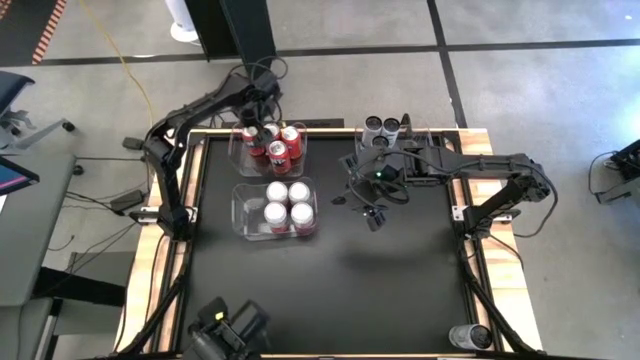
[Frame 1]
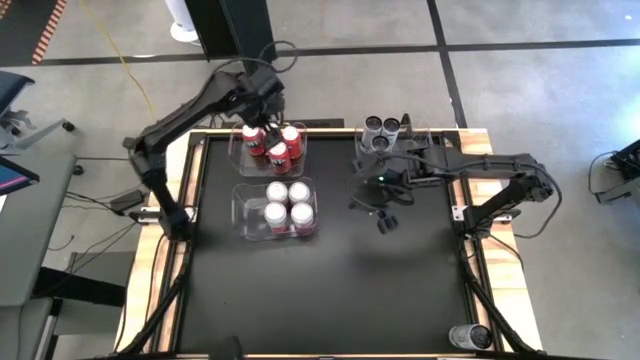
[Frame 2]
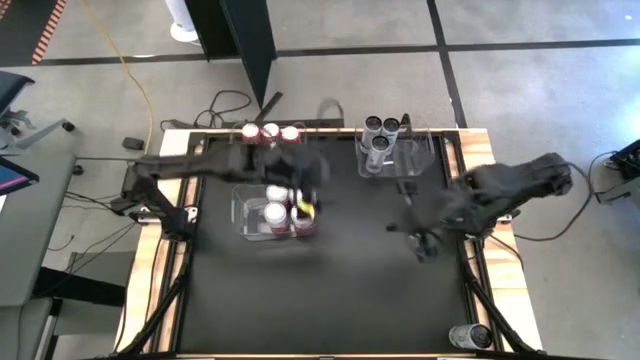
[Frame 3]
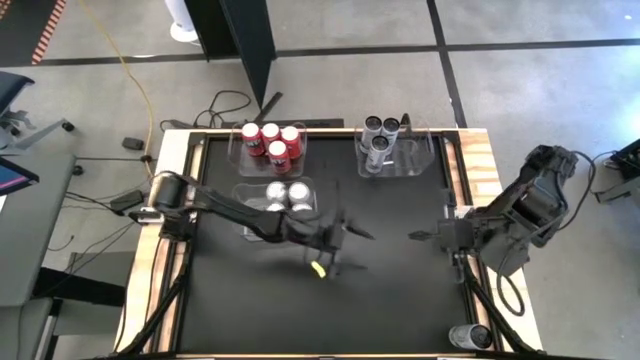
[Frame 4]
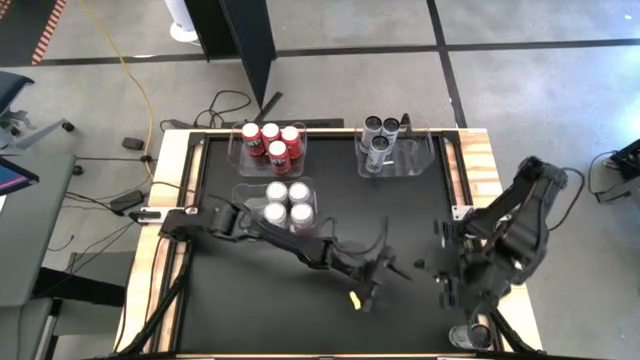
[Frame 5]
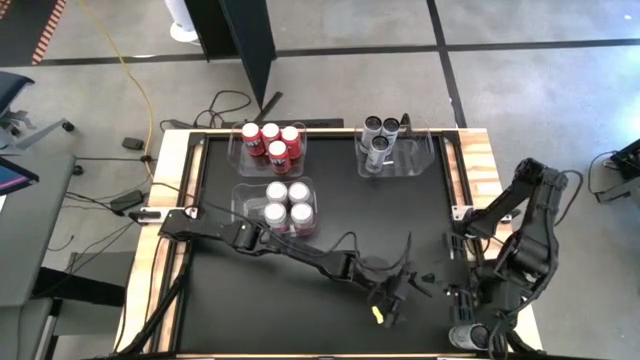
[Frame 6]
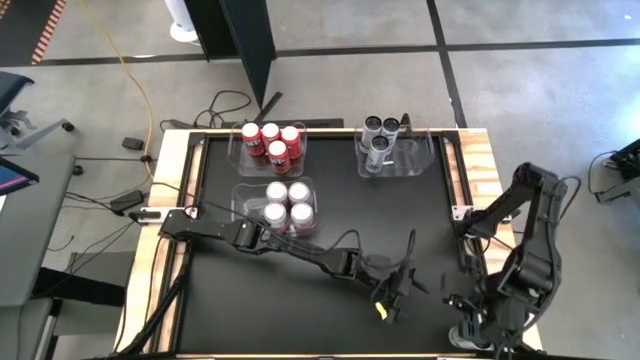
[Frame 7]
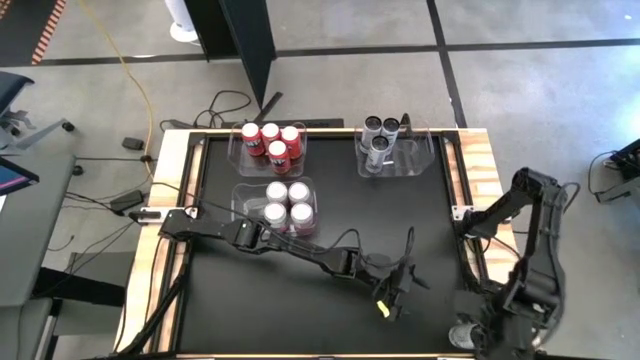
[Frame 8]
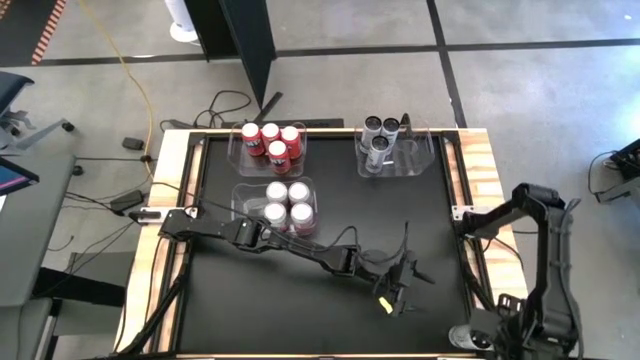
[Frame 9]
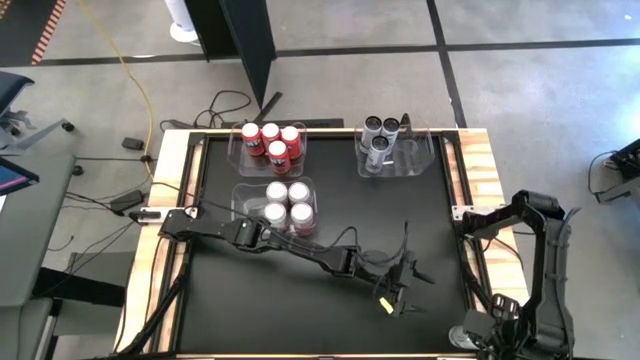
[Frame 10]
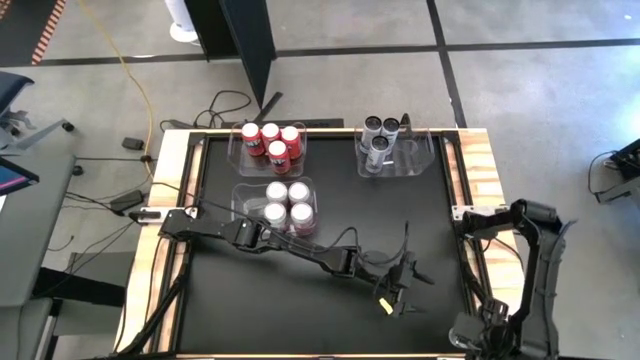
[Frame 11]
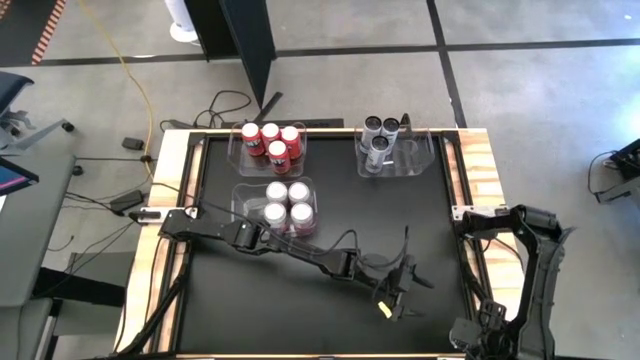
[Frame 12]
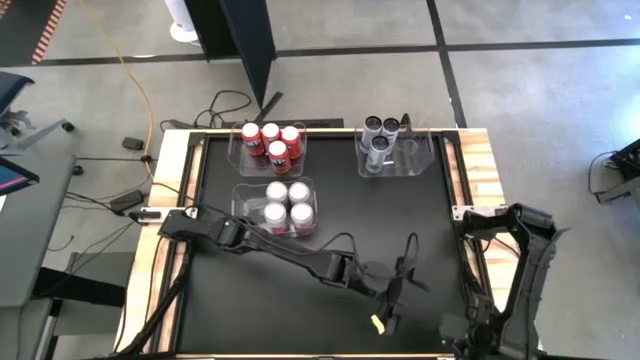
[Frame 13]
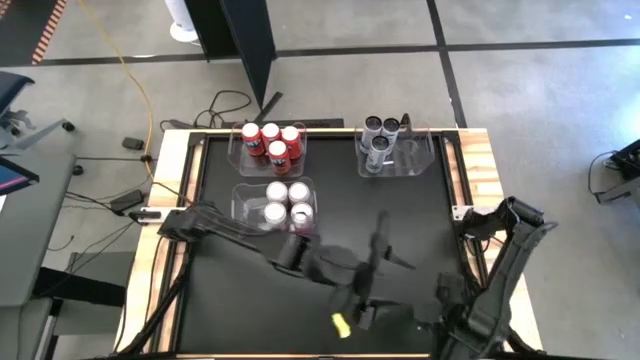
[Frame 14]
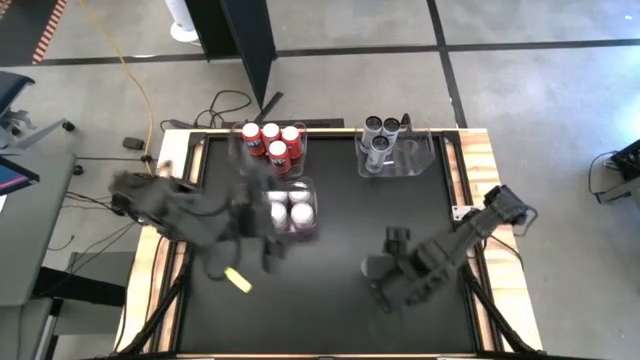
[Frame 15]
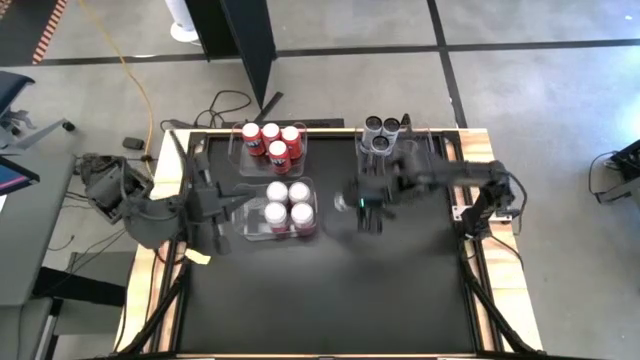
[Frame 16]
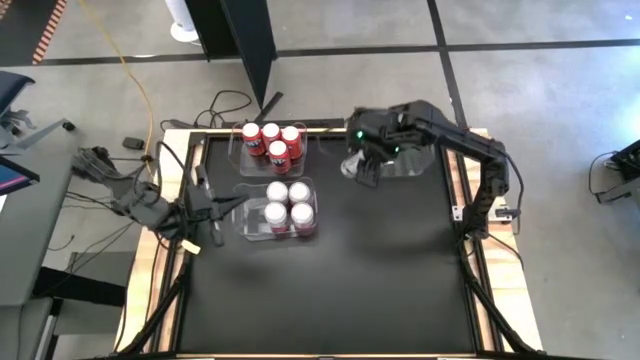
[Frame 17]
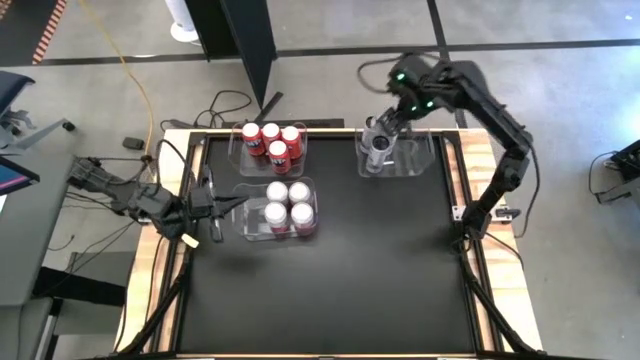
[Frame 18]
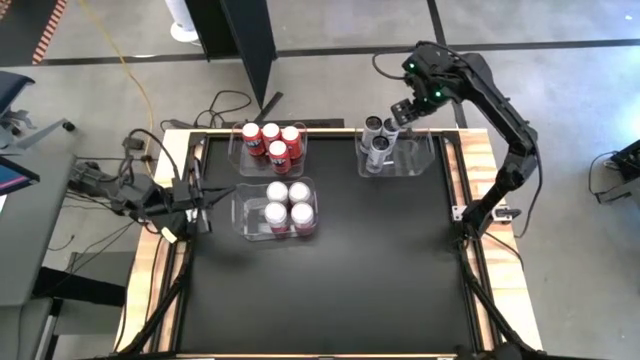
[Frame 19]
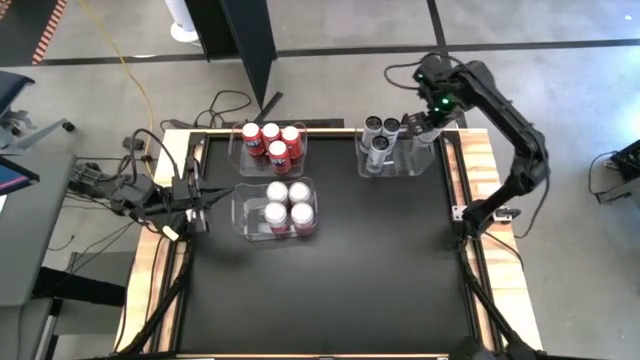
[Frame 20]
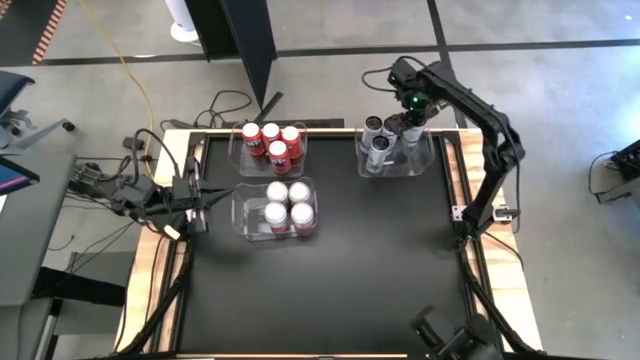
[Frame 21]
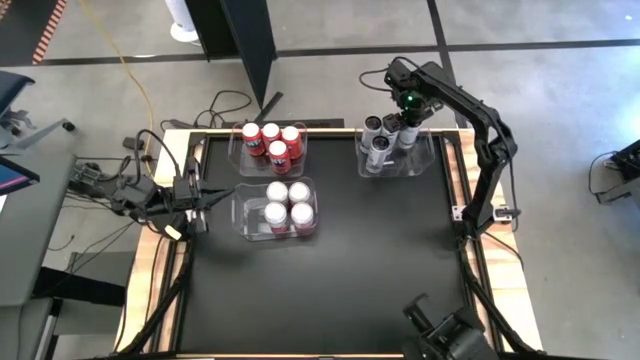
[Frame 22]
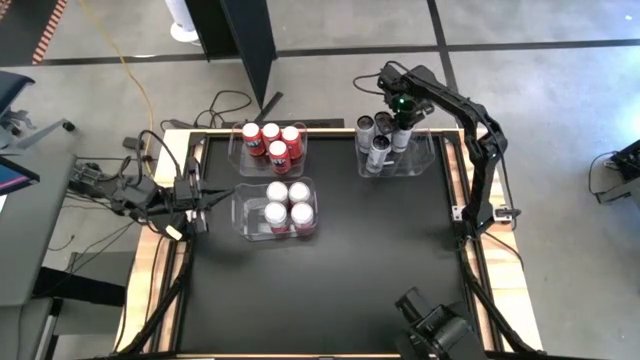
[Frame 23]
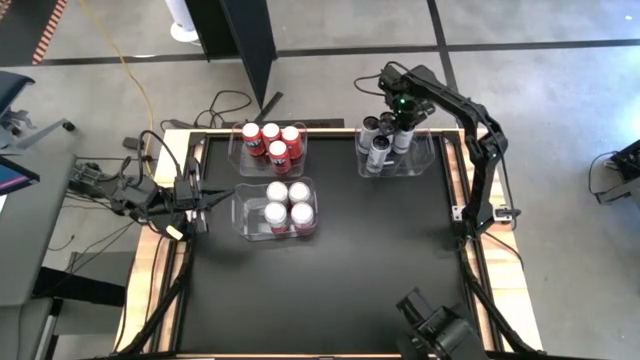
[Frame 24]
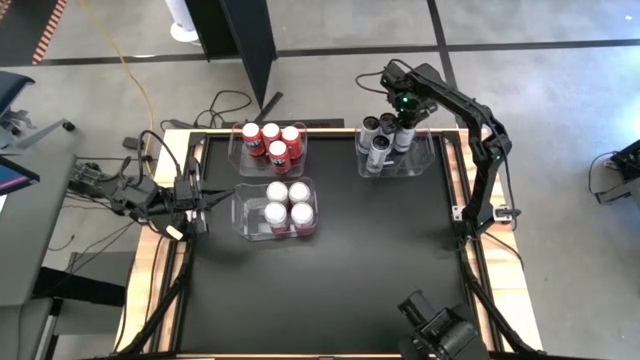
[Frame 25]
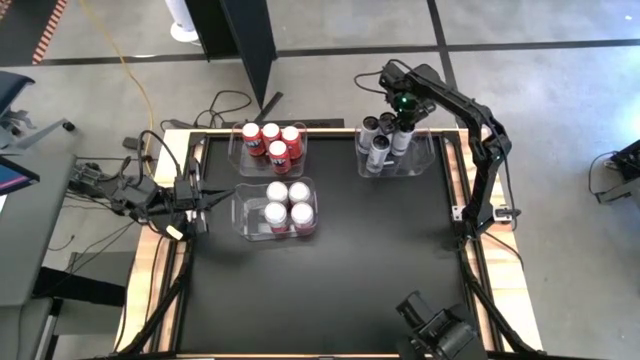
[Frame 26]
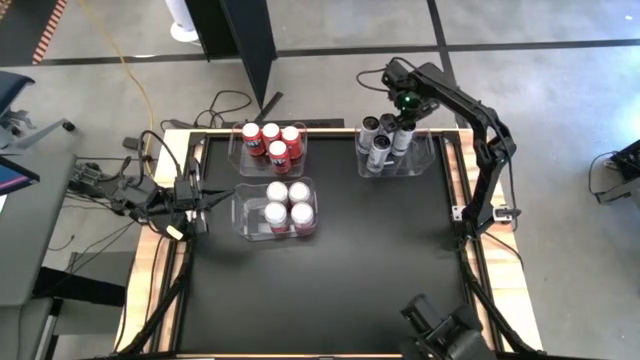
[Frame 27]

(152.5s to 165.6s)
Task: Sort soda cans
Put the white-blue soda can into the top right transparent bin

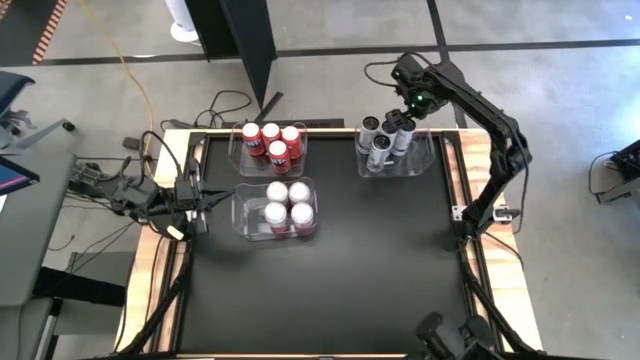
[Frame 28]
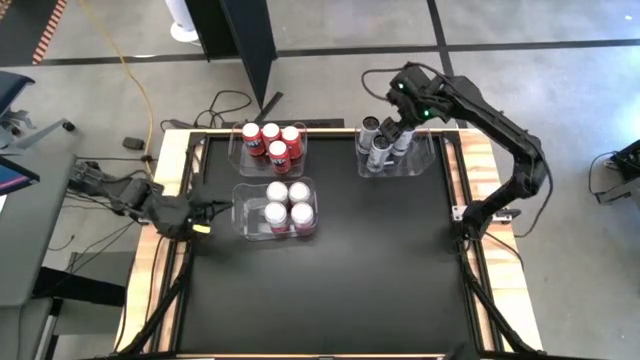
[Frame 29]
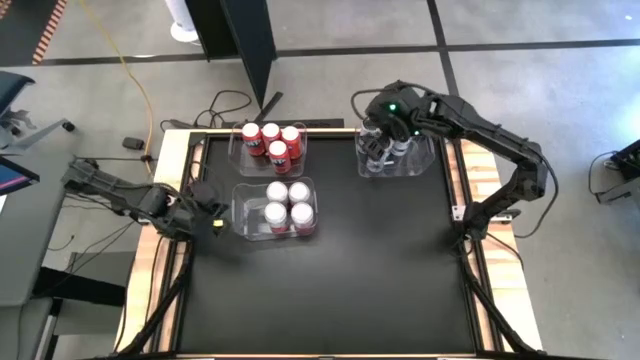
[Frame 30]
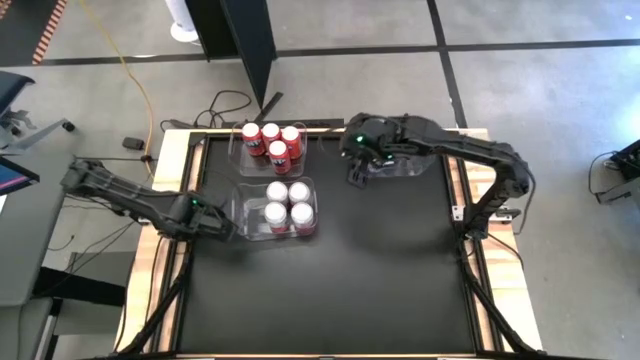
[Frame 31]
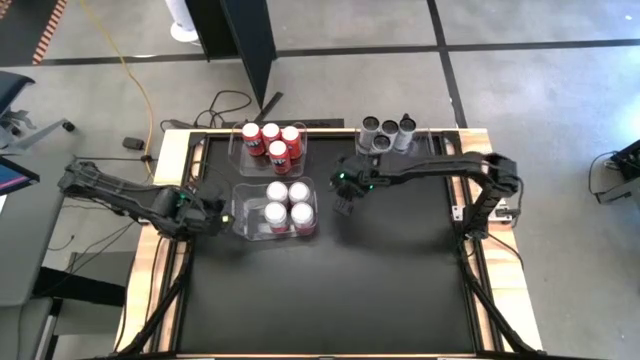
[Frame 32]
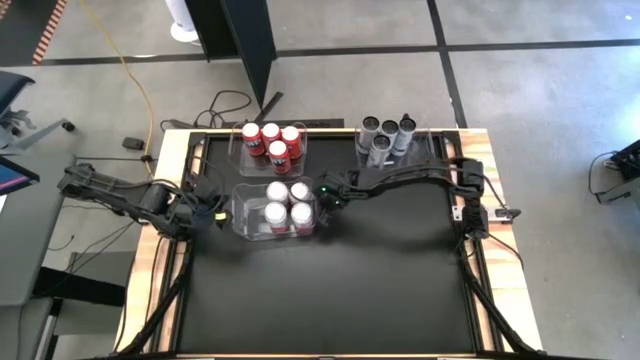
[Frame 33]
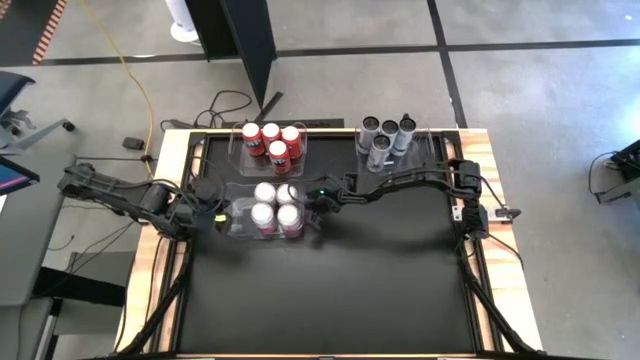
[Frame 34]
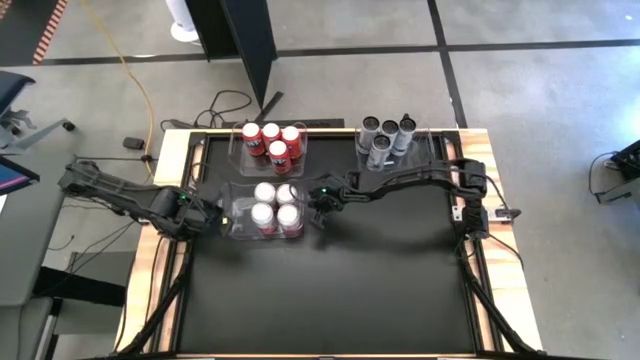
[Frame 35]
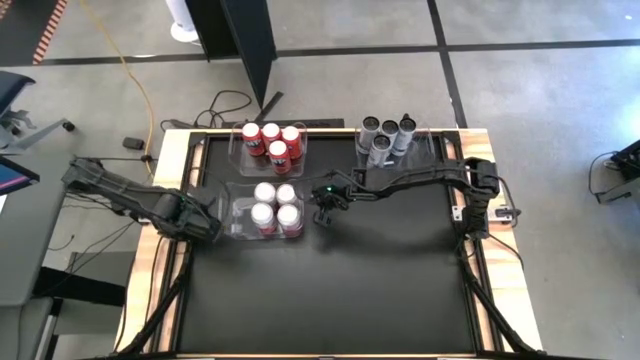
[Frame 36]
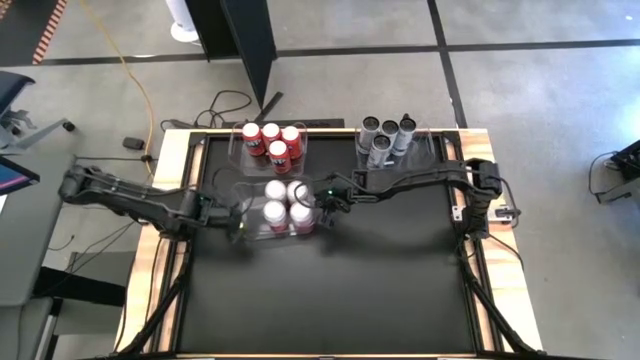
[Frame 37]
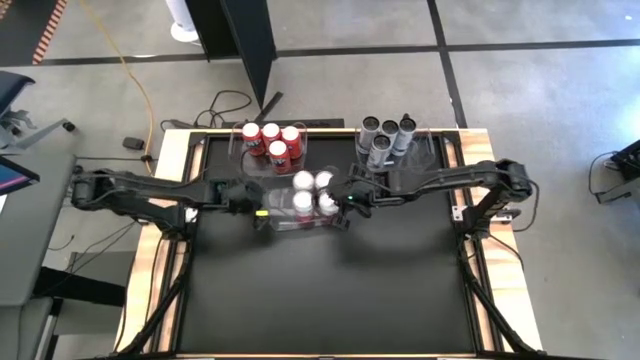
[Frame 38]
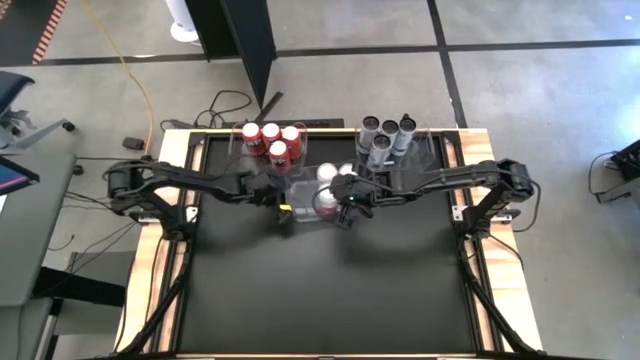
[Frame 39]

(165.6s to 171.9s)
Move the bottom transparent bin to center
